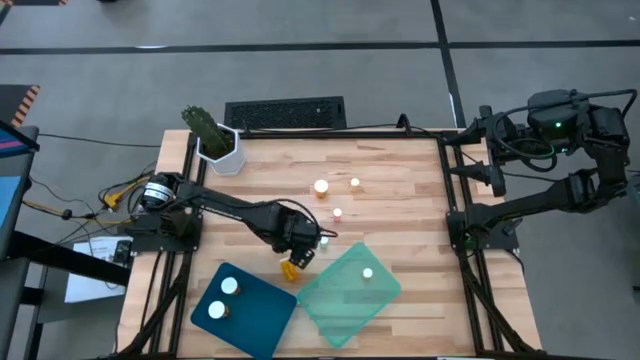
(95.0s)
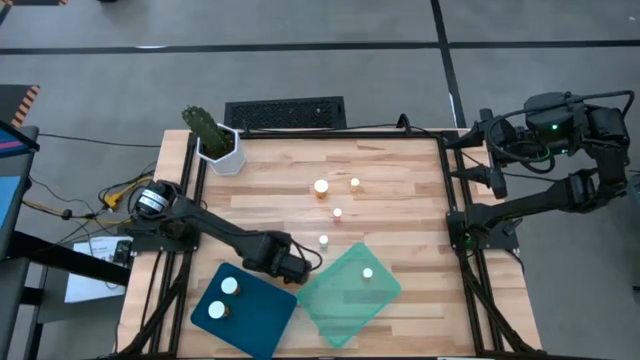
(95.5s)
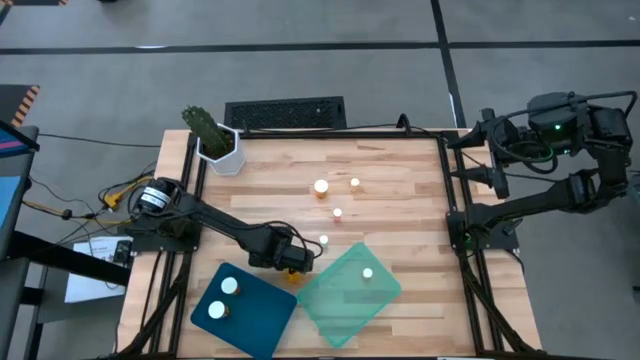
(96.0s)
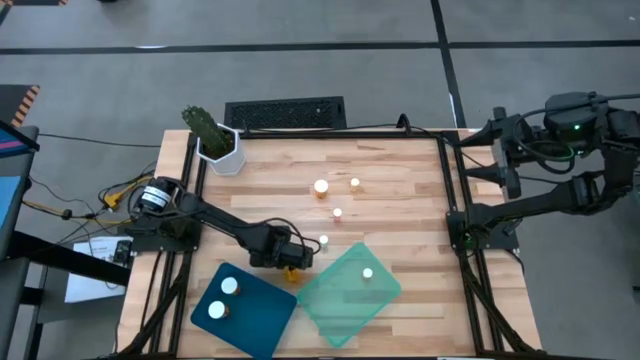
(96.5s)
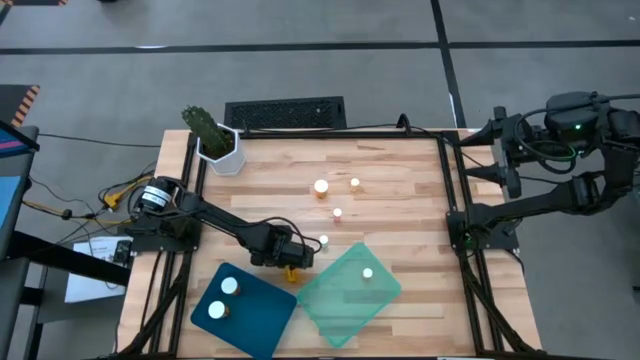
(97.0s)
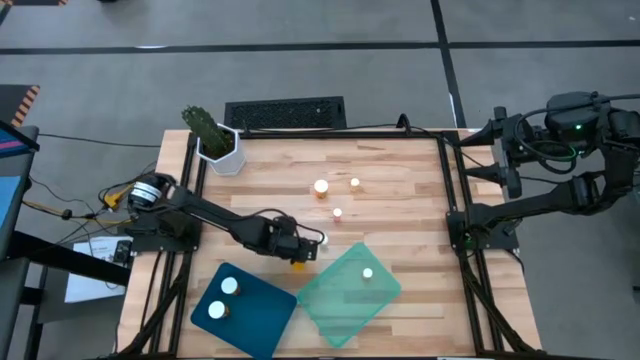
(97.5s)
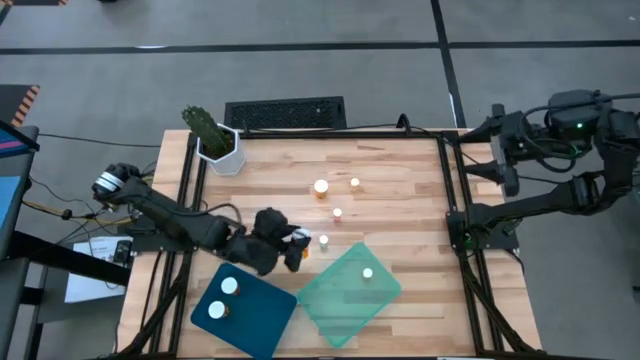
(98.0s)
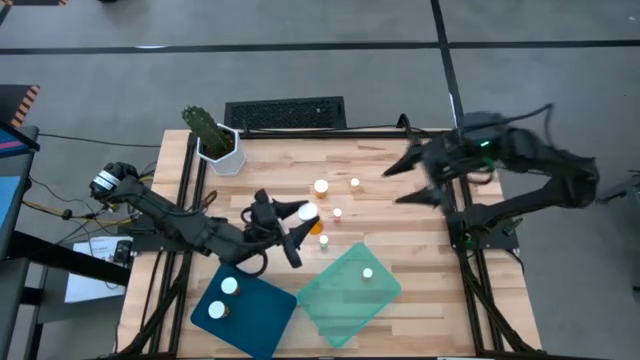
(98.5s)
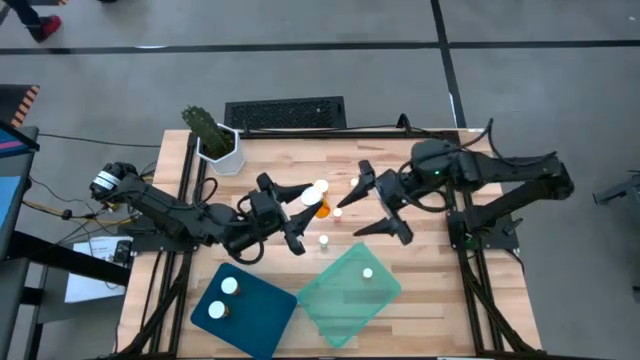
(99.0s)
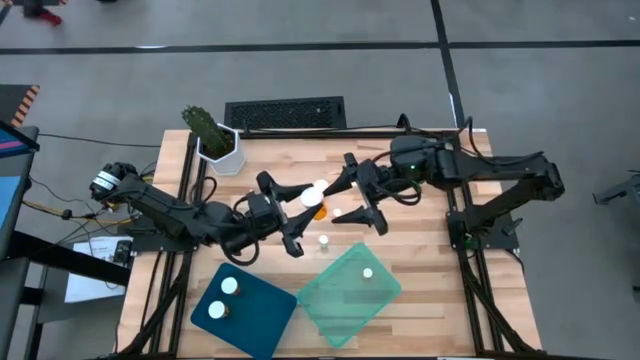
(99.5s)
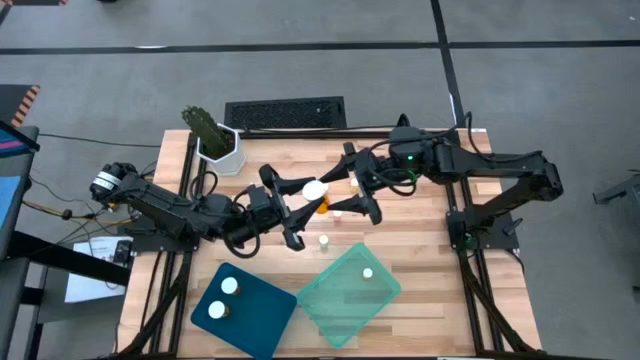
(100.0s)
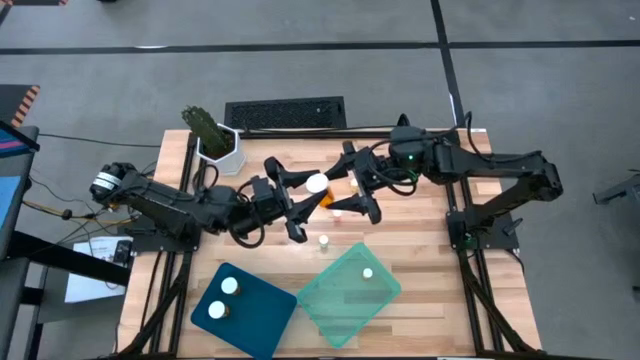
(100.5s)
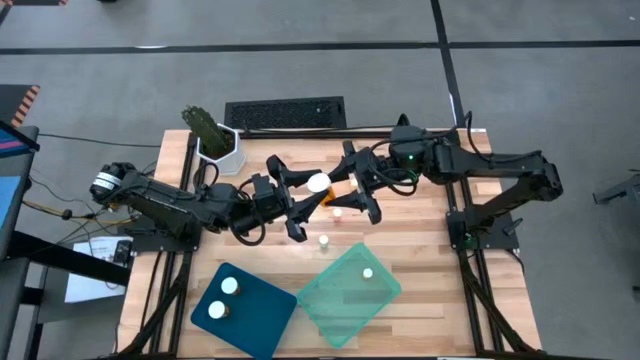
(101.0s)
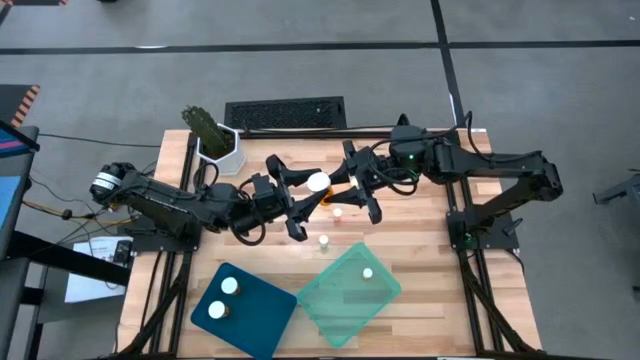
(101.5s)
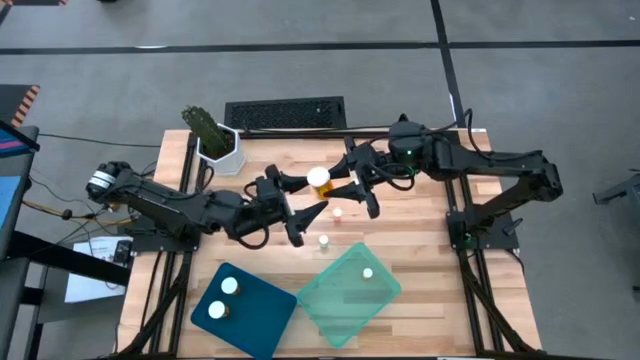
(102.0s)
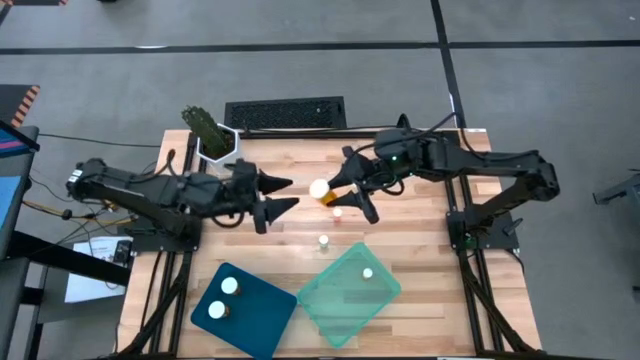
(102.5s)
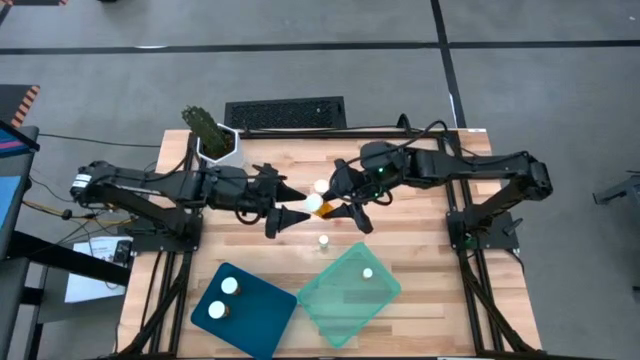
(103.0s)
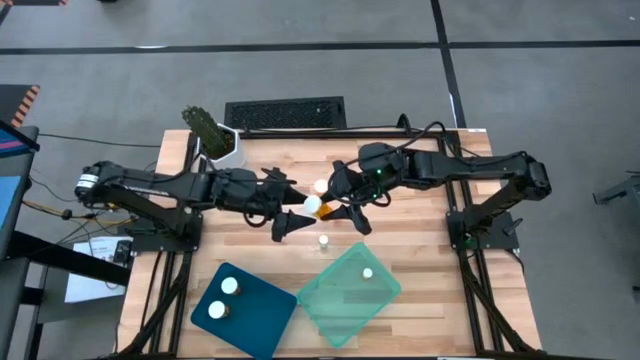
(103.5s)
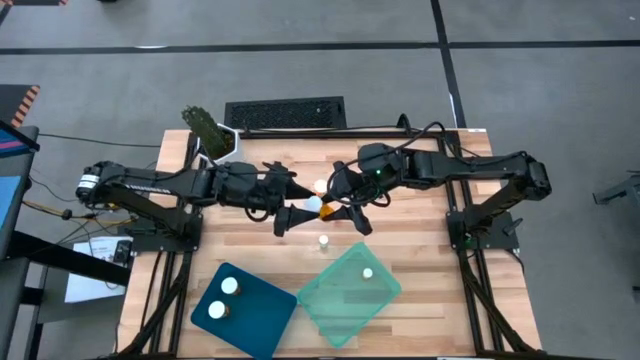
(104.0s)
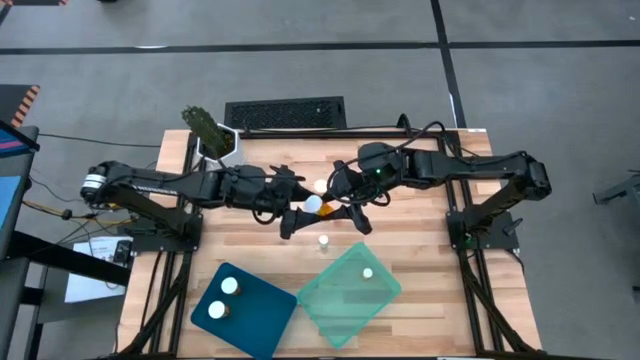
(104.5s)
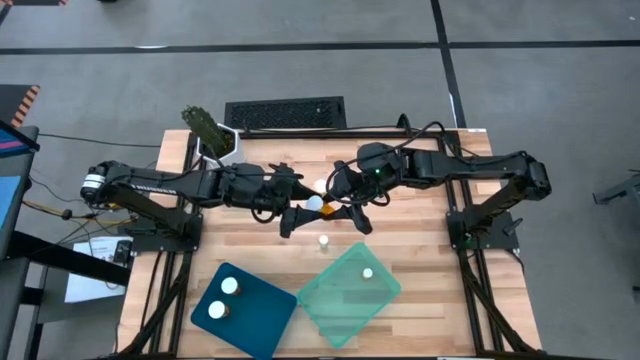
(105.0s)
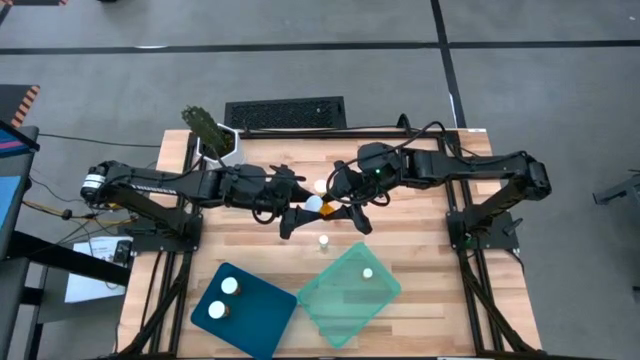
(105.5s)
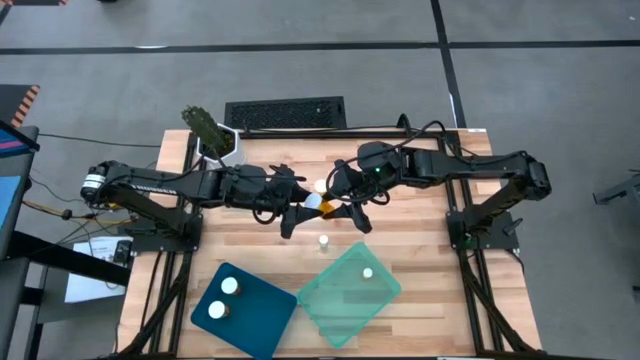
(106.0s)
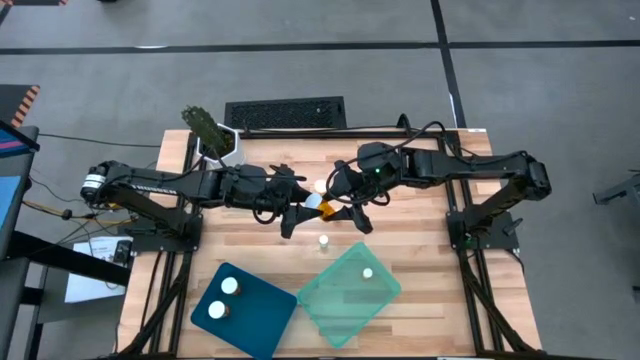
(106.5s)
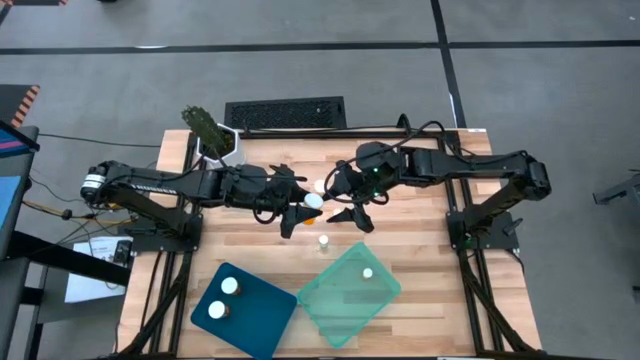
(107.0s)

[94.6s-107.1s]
Task: Pick and place medicine bottles into bin by pill shape (circle, oval)
Put the big orange pill bottle into the blue bin

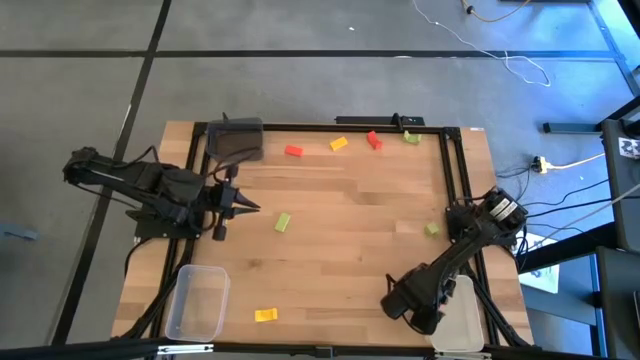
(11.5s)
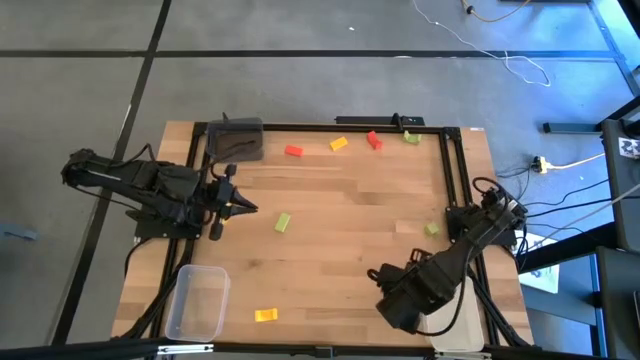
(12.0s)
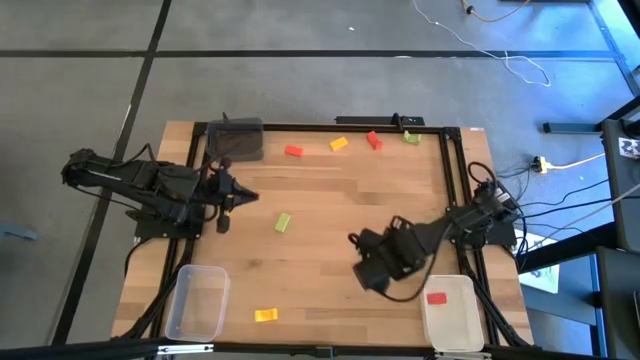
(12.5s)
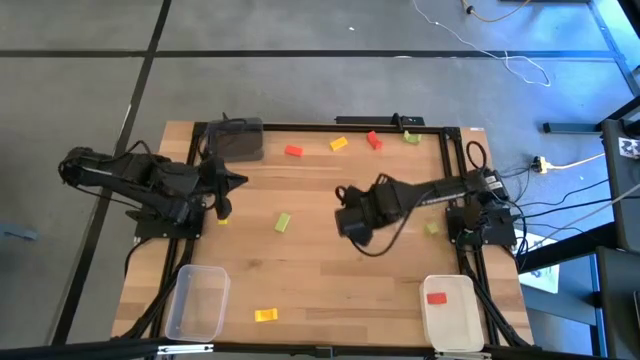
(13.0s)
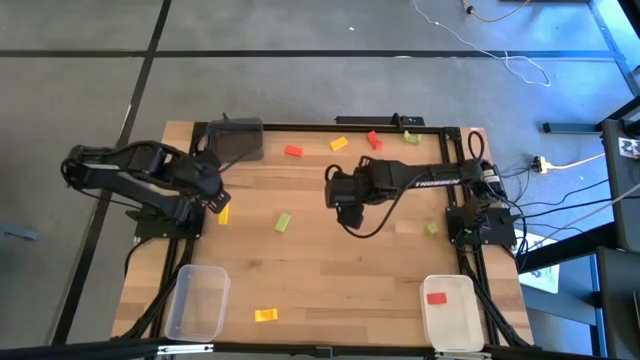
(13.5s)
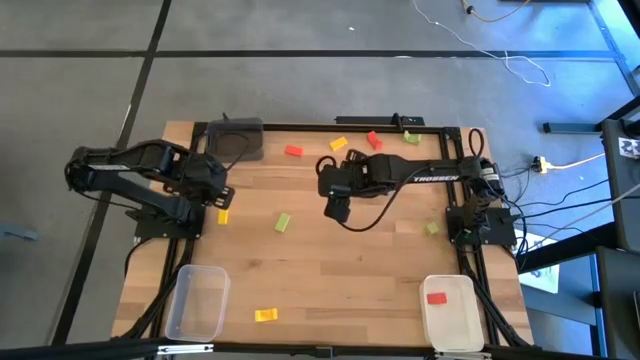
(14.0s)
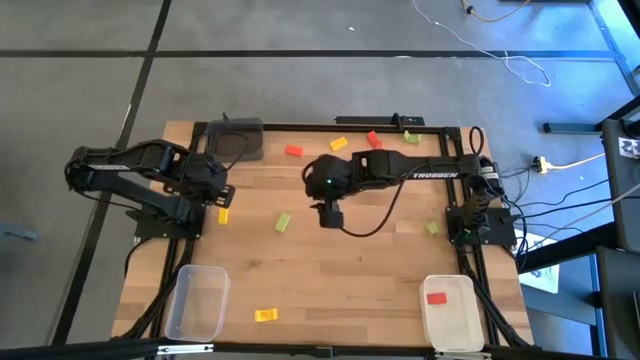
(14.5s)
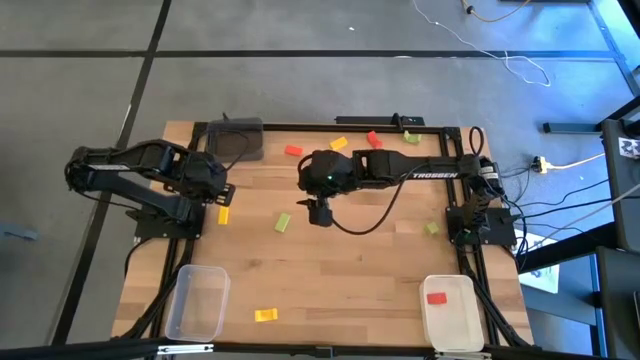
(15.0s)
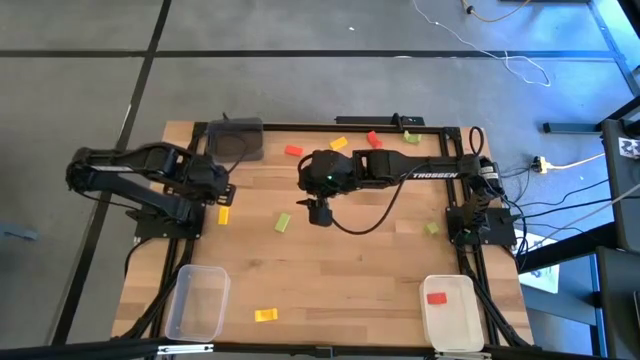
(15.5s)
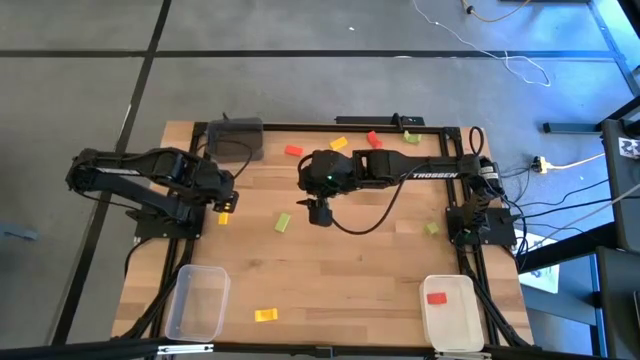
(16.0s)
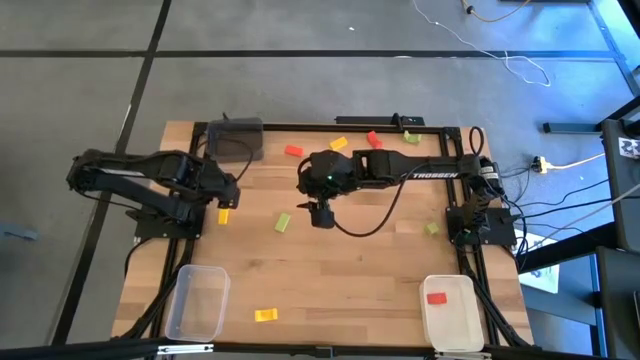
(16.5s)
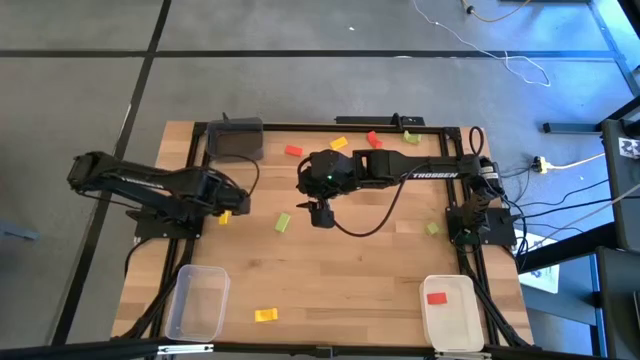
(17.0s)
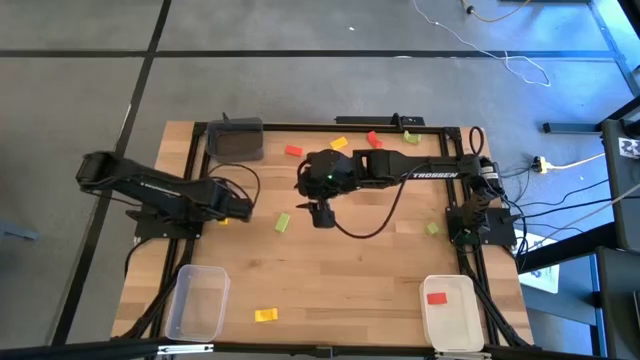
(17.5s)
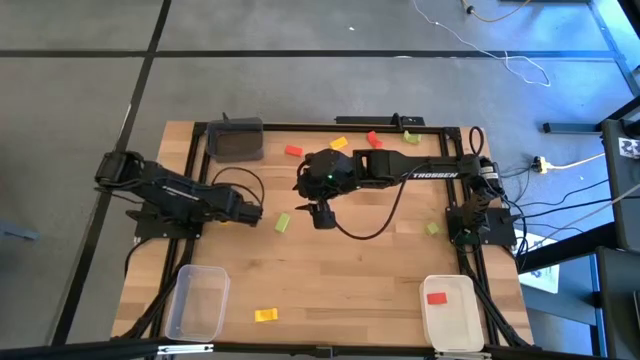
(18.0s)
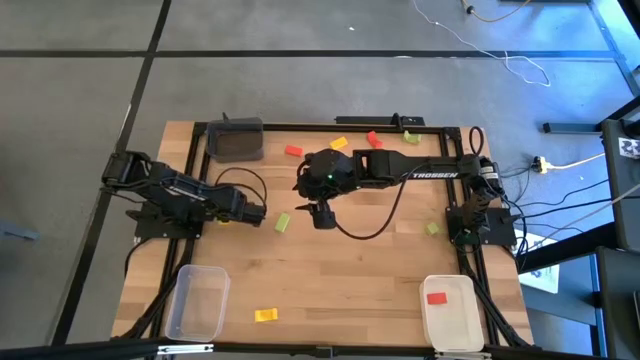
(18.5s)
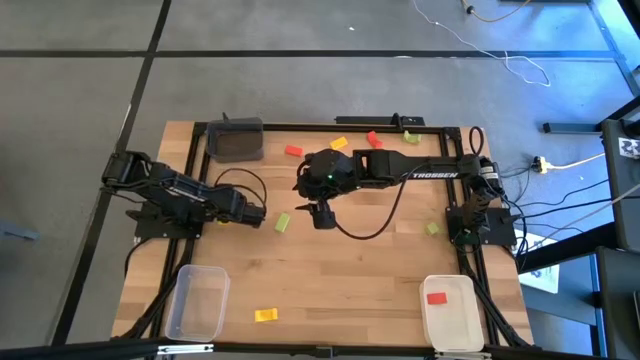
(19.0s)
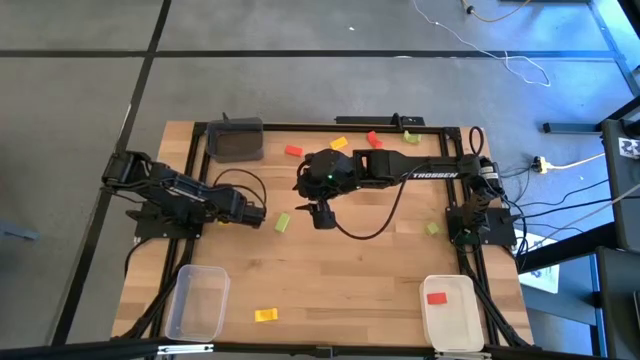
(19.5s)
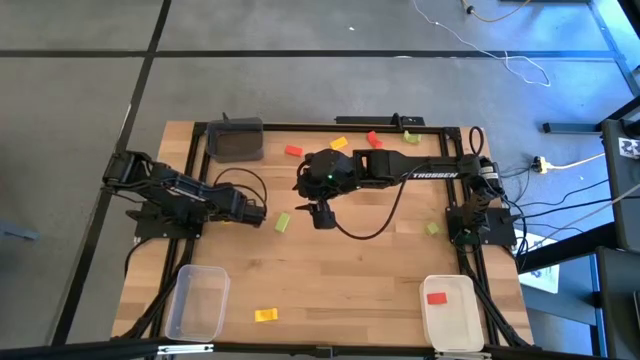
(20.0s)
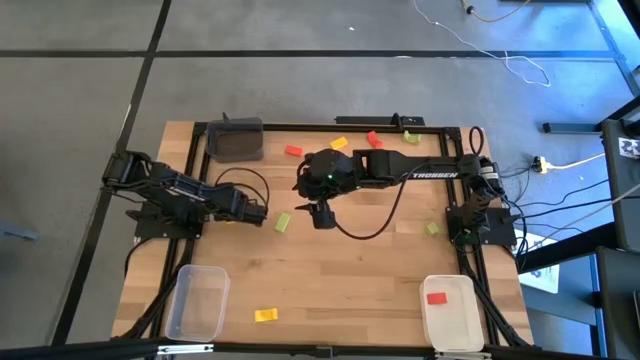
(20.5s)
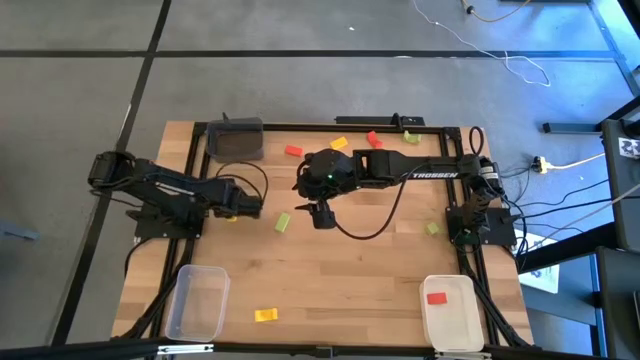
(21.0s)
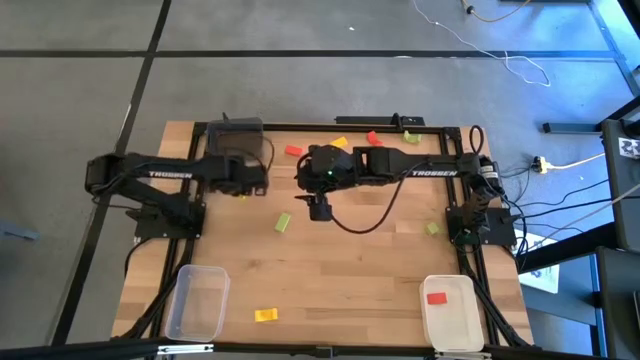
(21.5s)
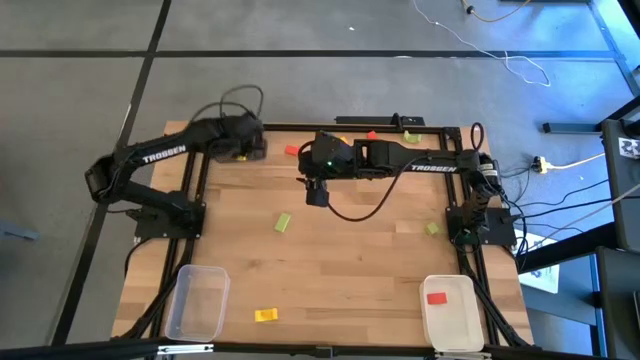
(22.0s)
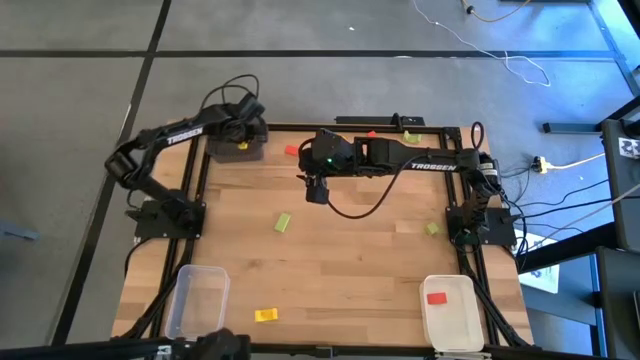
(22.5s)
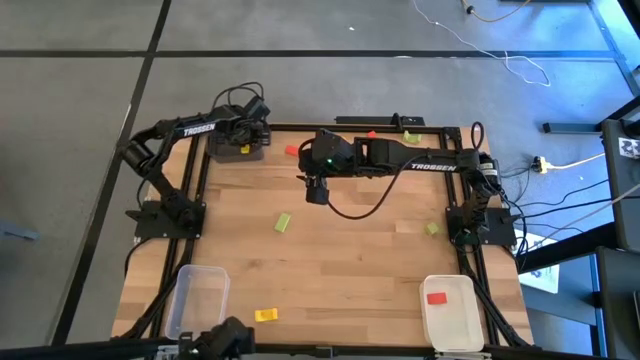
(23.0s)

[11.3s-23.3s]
Task: Sort & place blocks by color
Put the middle yellow block into the black bin
